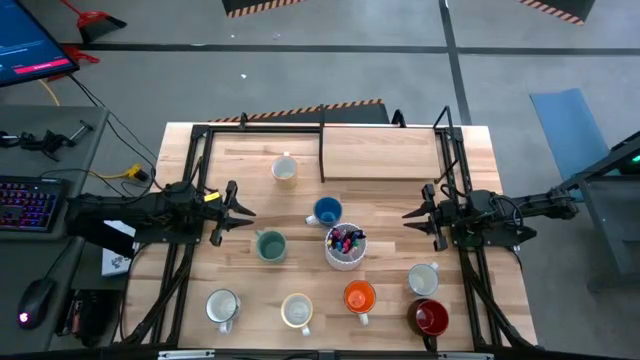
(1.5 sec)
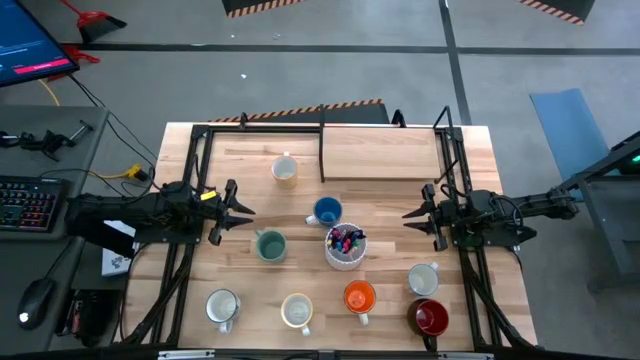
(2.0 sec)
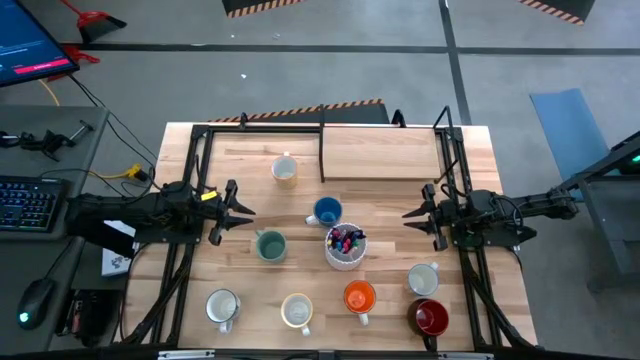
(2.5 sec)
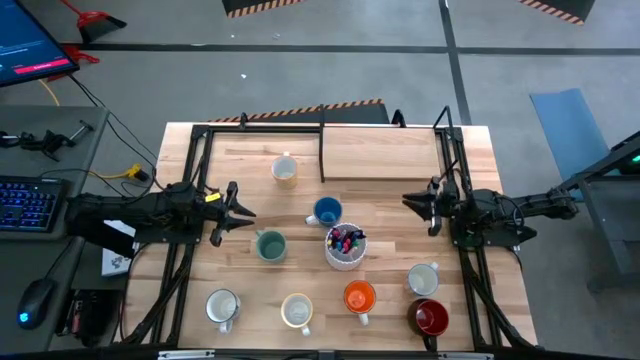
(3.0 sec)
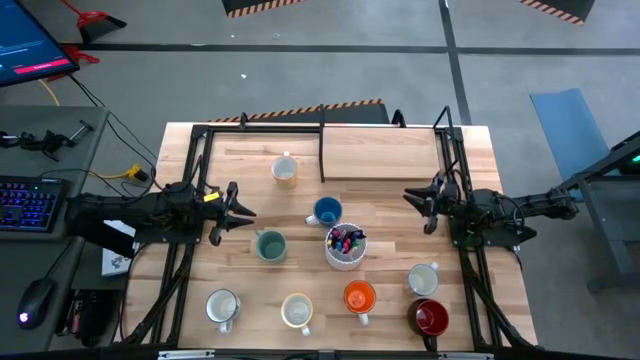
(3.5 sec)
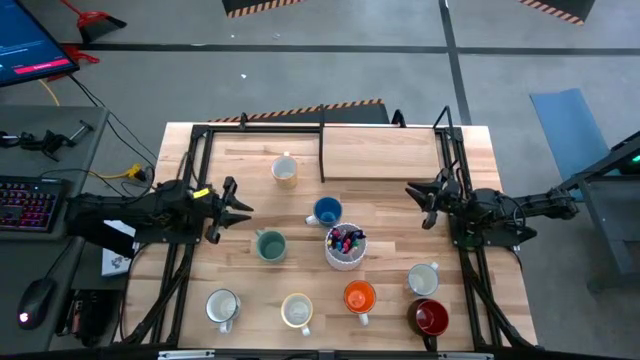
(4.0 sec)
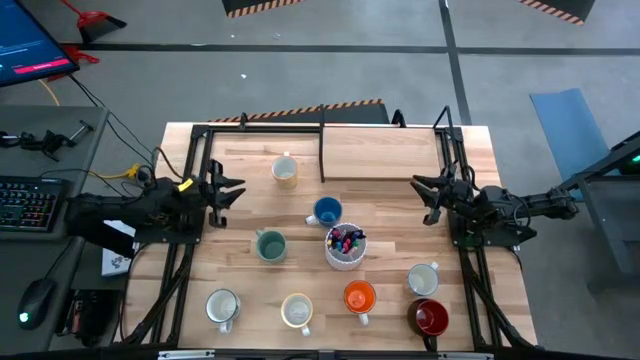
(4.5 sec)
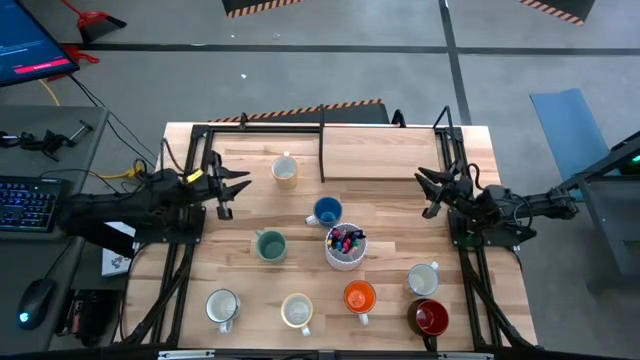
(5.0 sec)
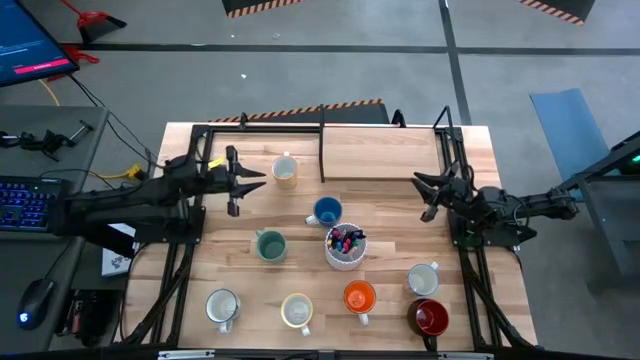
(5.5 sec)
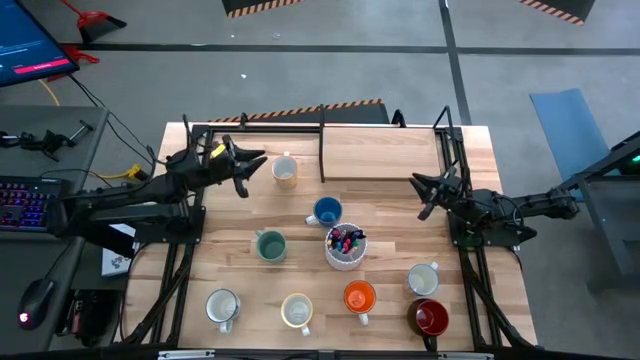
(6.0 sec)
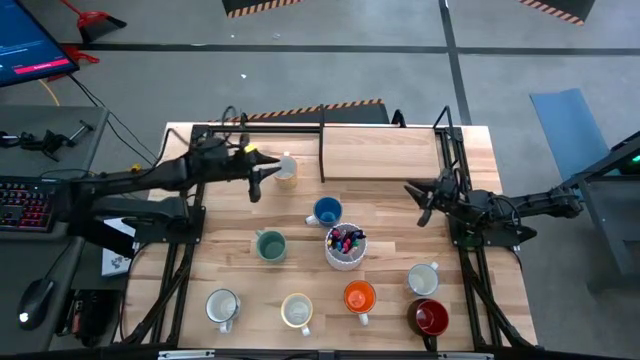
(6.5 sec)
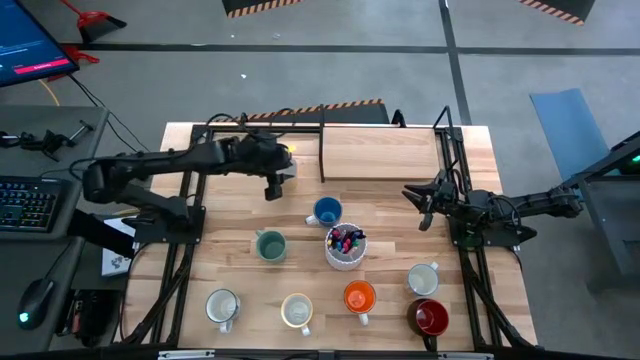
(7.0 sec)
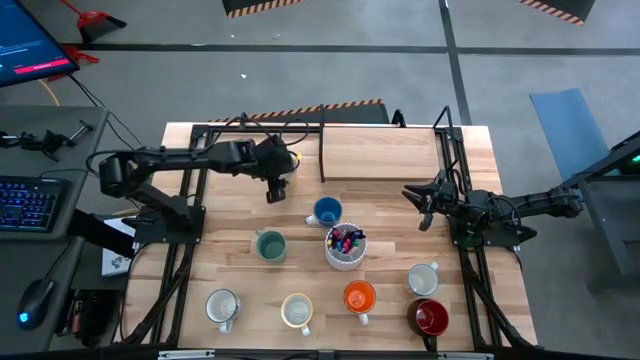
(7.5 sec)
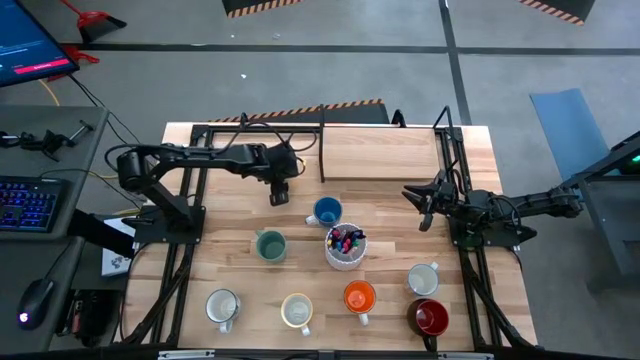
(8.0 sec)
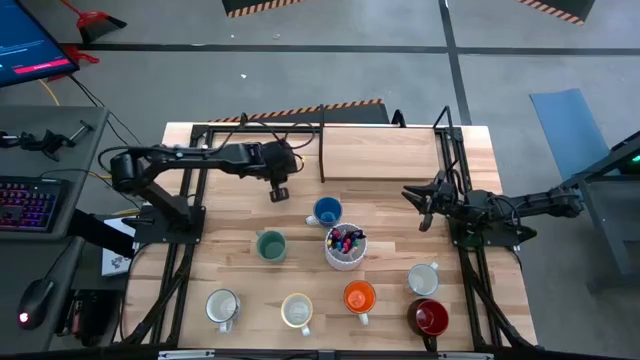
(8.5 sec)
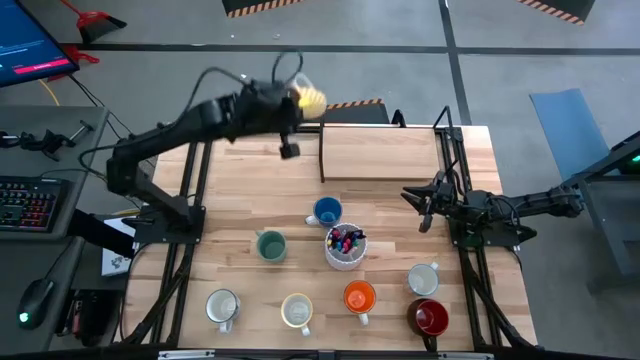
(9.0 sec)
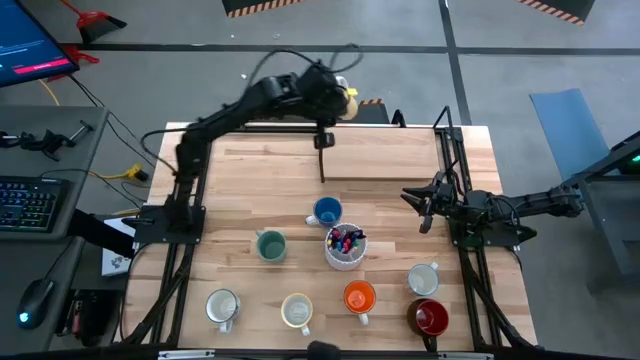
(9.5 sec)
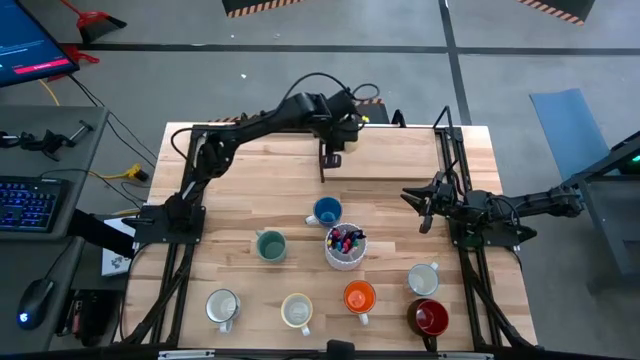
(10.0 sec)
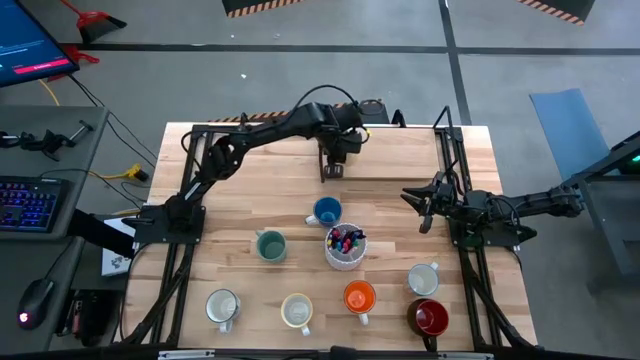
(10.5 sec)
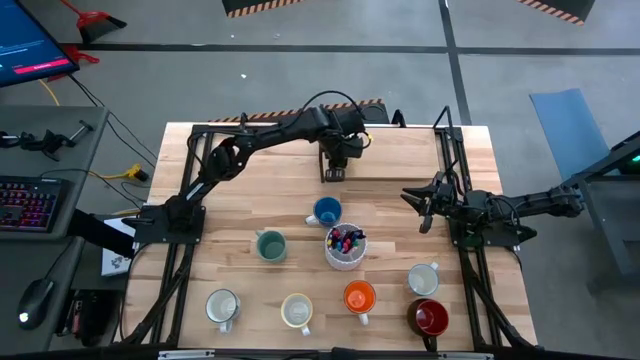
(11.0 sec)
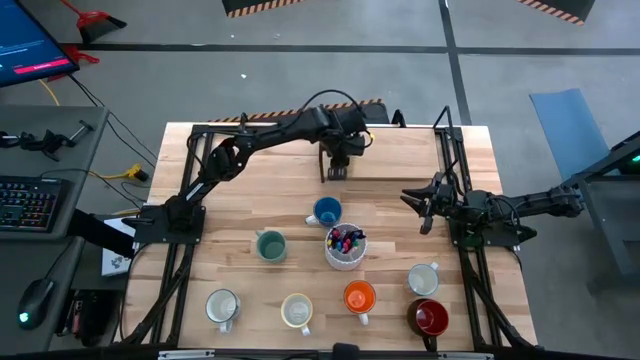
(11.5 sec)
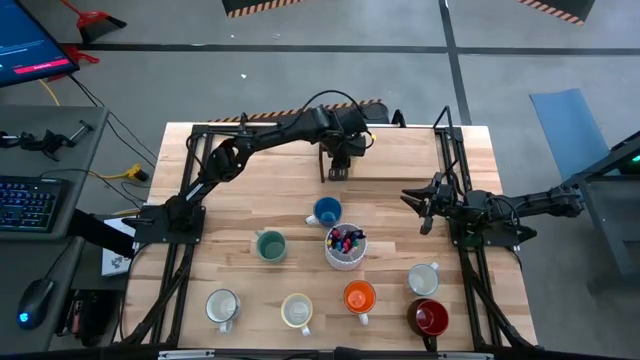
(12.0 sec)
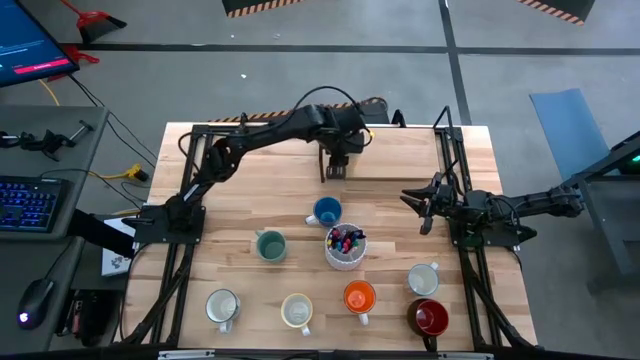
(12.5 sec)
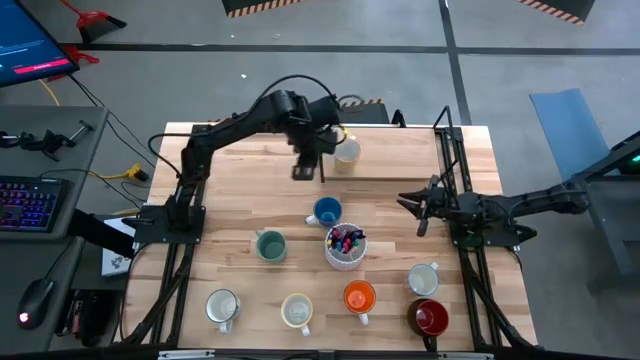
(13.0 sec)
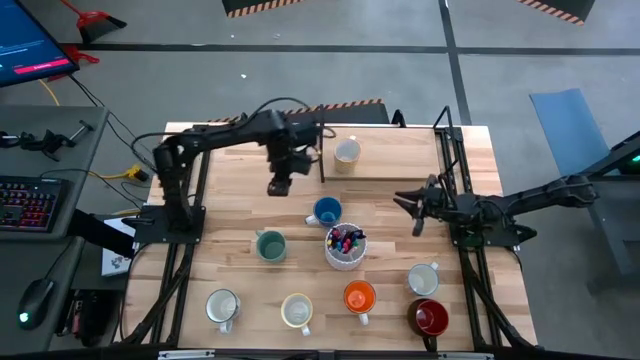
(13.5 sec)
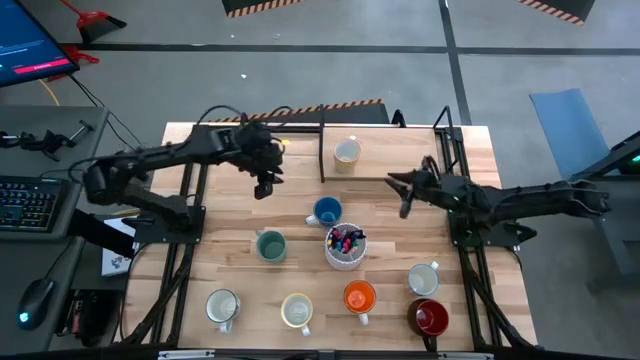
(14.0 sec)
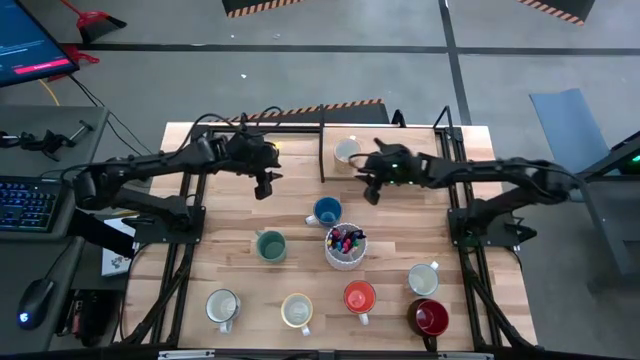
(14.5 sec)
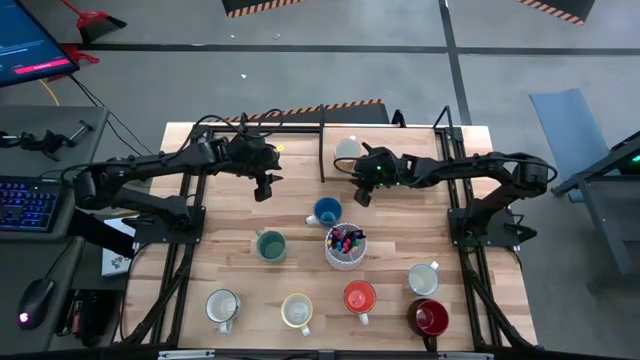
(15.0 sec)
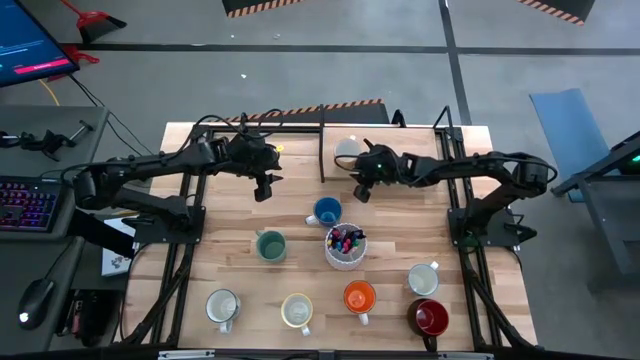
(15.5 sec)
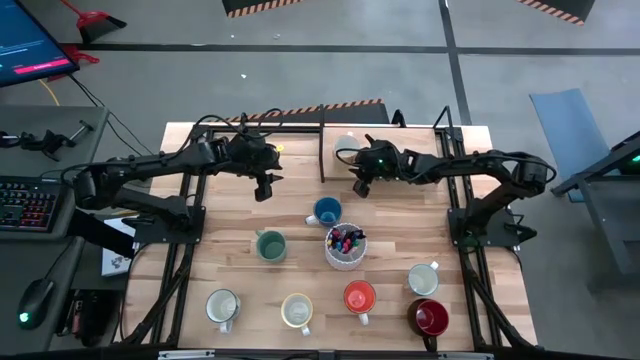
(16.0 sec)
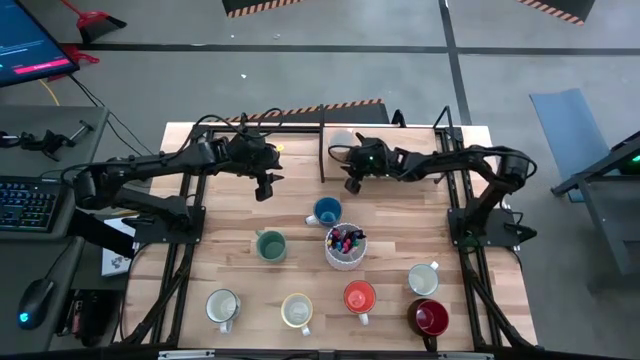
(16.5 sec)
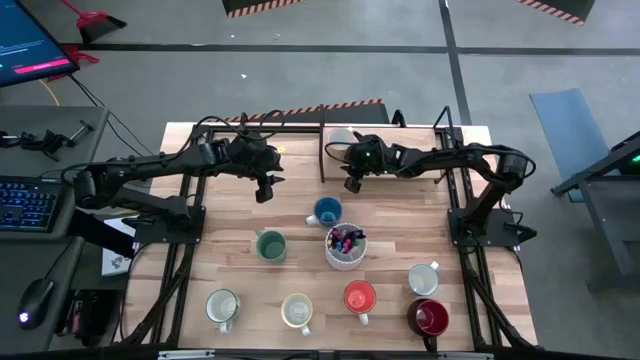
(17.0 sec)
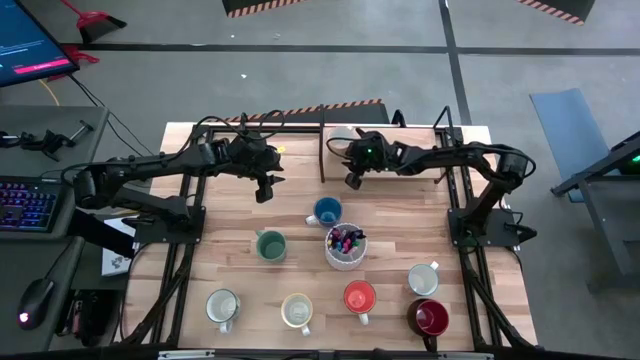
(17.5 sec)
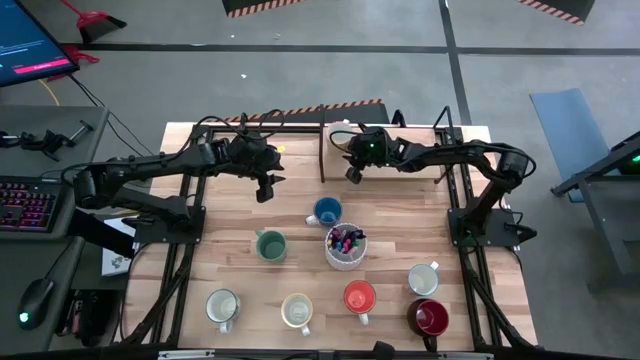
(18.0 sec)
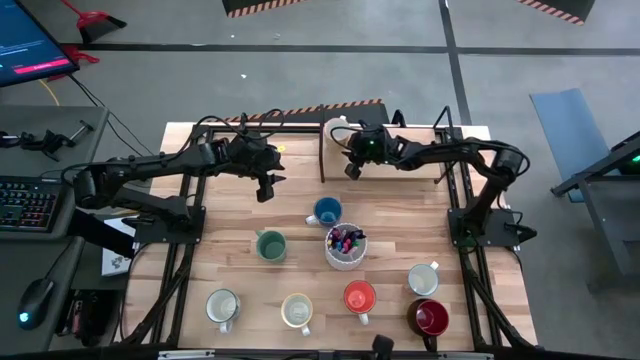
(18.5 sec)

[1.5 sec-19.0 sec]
Task: Place coffee mugs
Put the yellow patterned mug on the shelf
